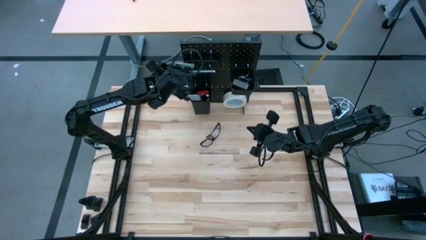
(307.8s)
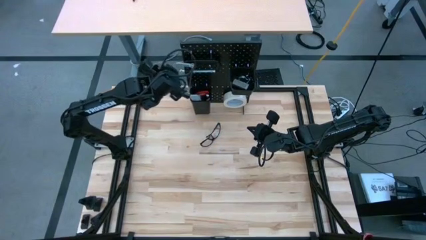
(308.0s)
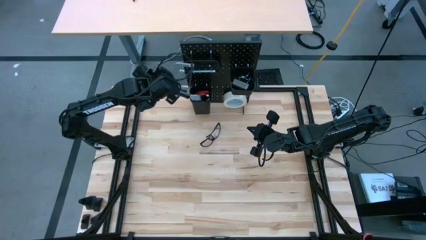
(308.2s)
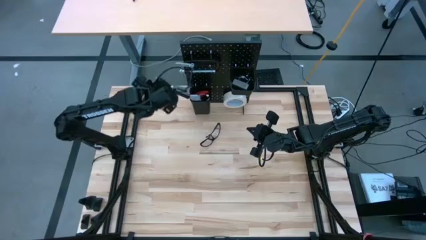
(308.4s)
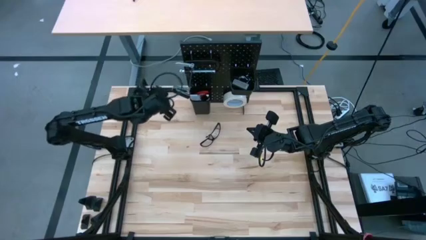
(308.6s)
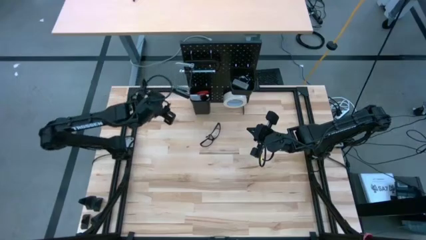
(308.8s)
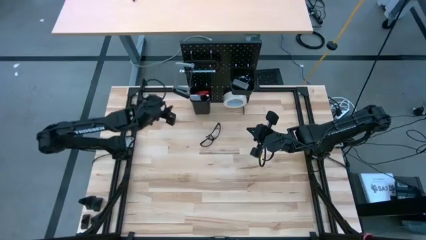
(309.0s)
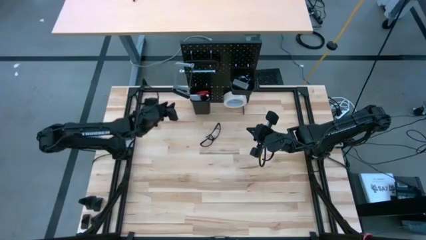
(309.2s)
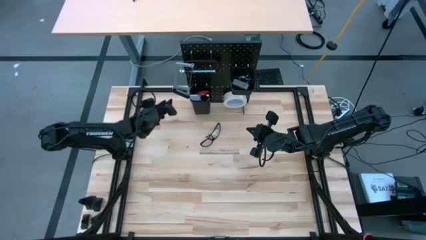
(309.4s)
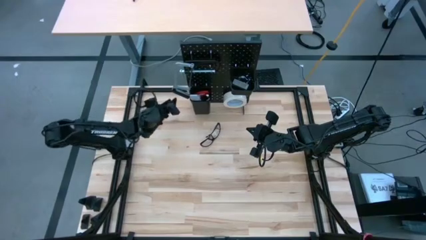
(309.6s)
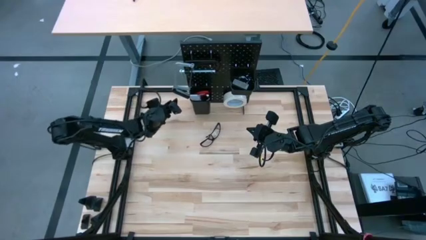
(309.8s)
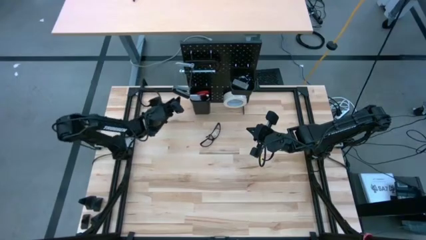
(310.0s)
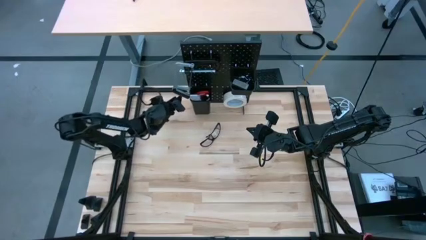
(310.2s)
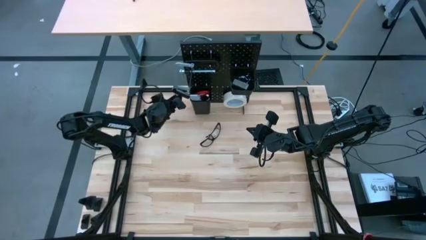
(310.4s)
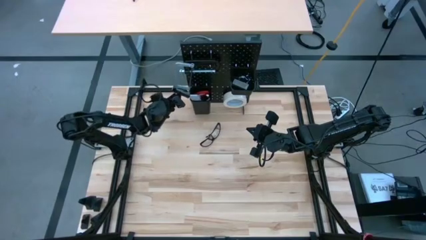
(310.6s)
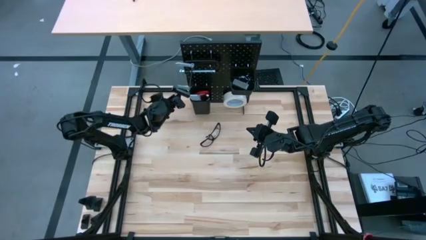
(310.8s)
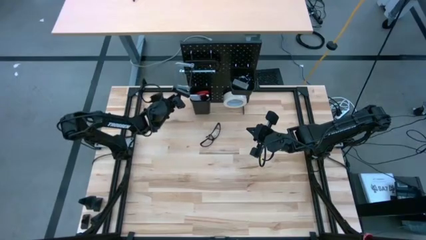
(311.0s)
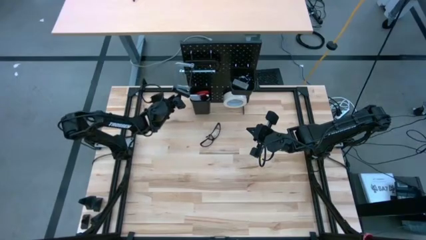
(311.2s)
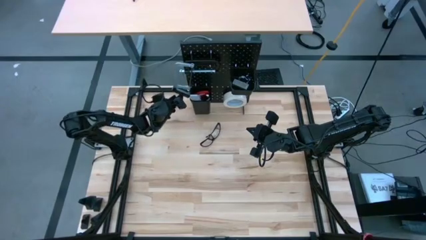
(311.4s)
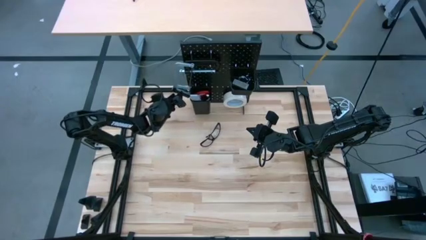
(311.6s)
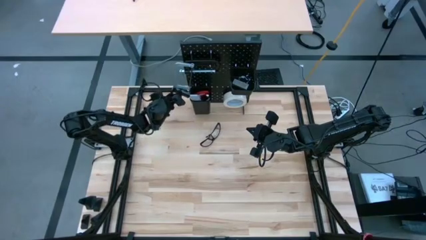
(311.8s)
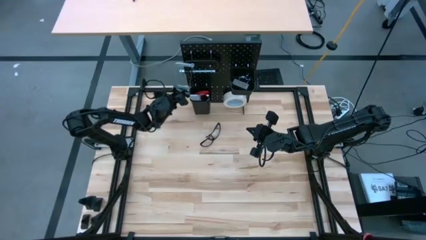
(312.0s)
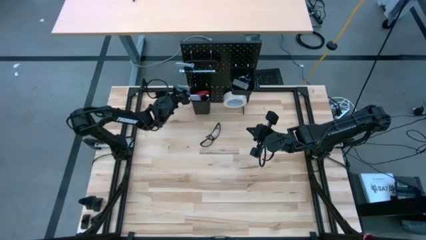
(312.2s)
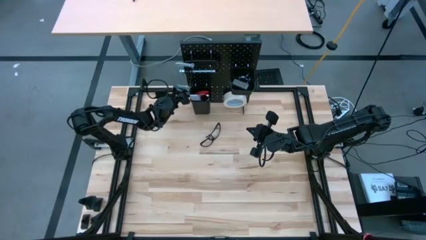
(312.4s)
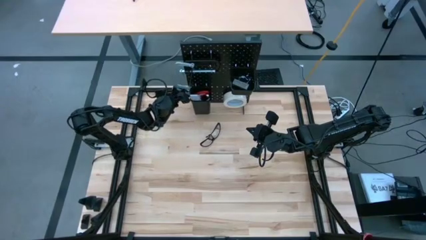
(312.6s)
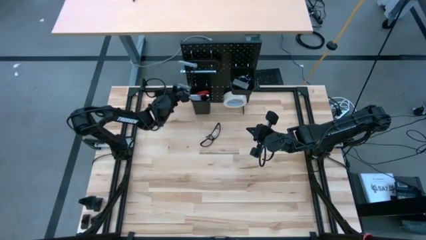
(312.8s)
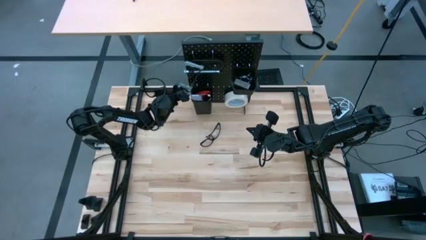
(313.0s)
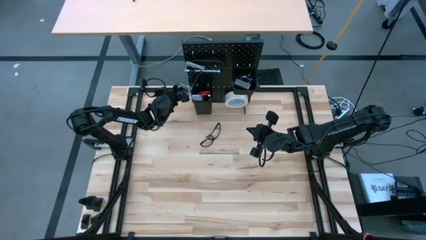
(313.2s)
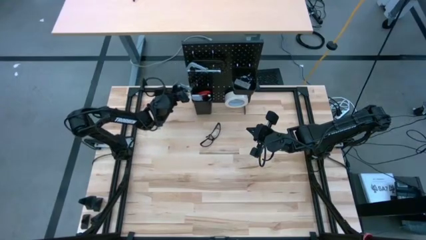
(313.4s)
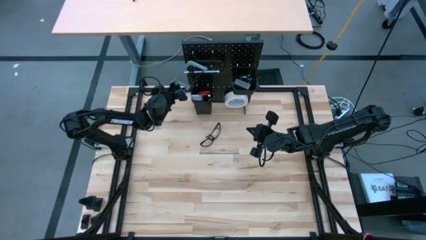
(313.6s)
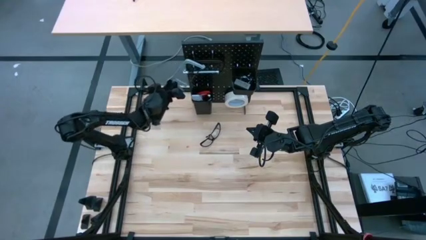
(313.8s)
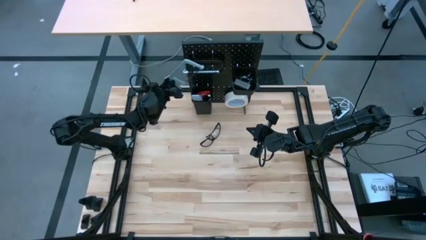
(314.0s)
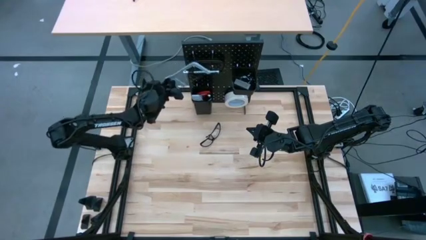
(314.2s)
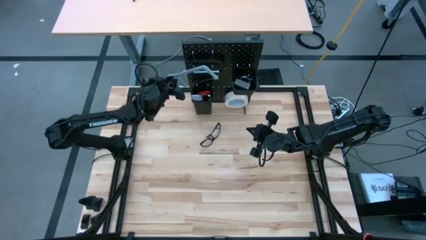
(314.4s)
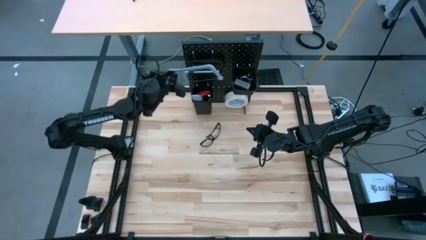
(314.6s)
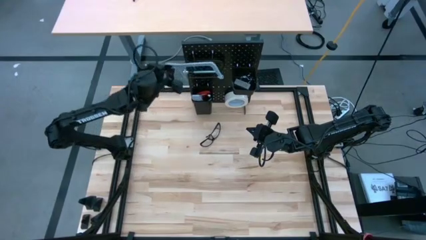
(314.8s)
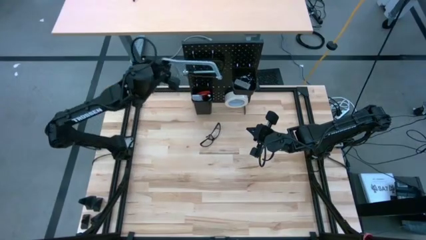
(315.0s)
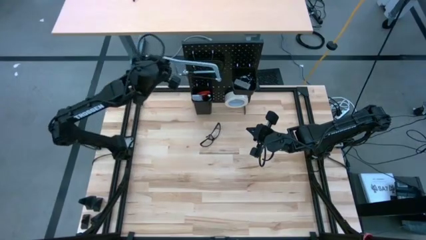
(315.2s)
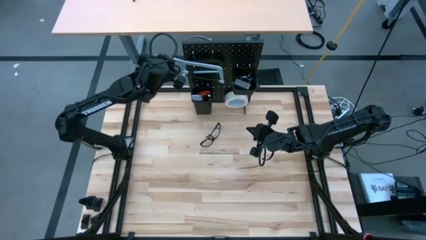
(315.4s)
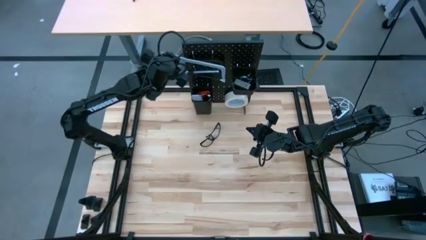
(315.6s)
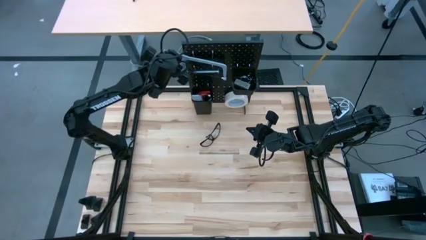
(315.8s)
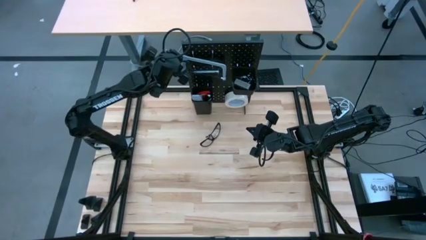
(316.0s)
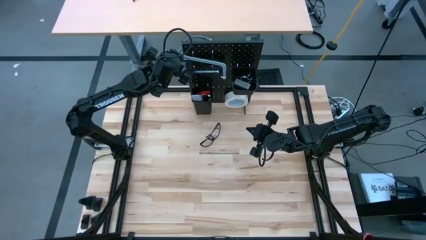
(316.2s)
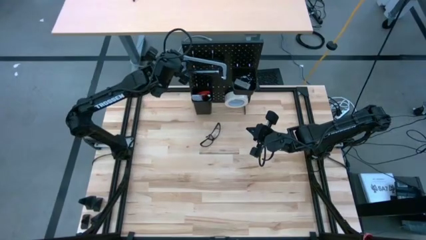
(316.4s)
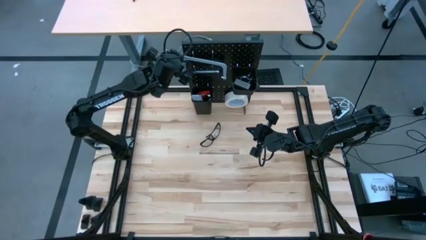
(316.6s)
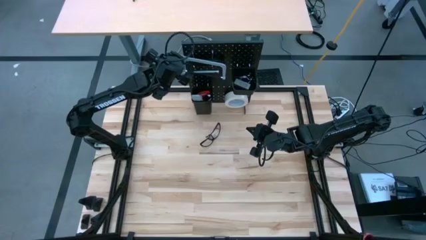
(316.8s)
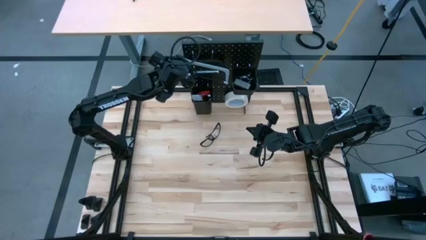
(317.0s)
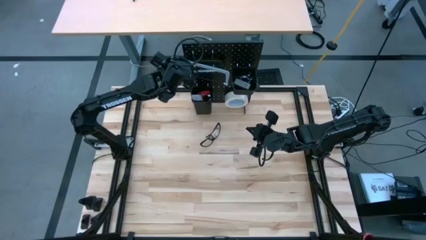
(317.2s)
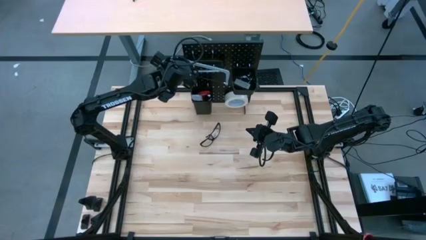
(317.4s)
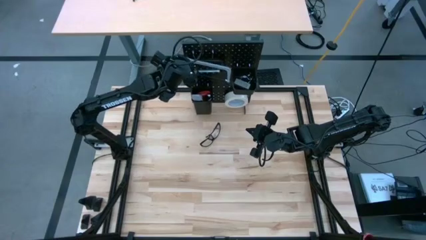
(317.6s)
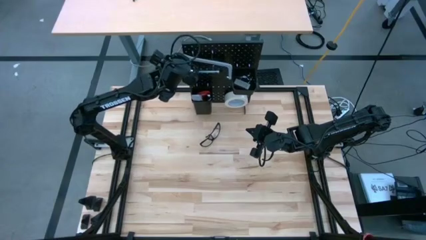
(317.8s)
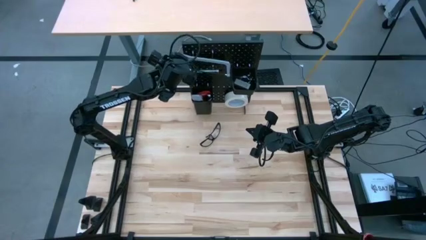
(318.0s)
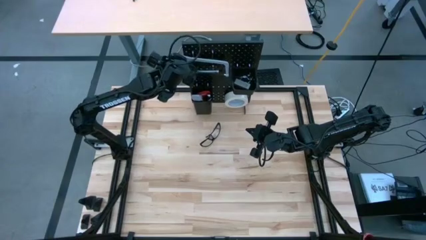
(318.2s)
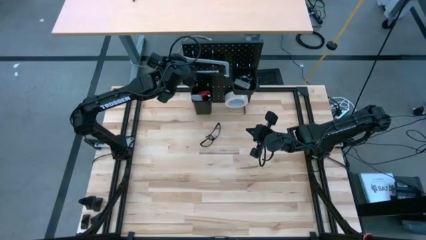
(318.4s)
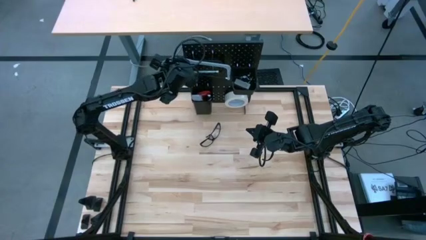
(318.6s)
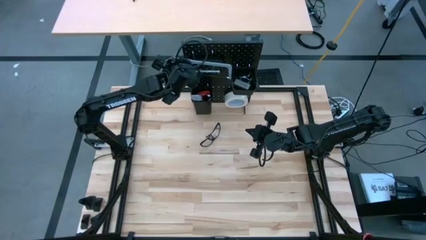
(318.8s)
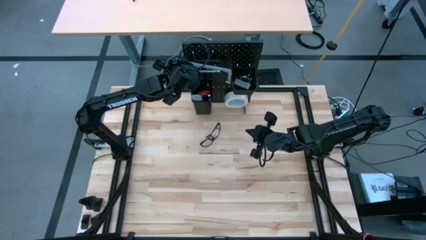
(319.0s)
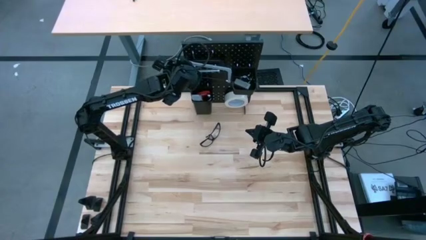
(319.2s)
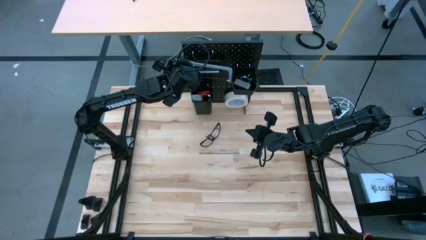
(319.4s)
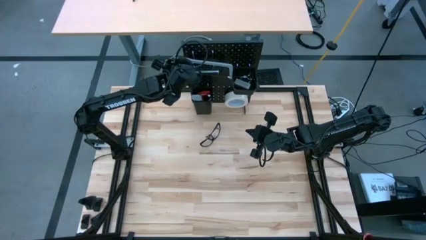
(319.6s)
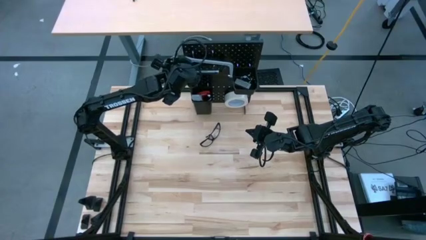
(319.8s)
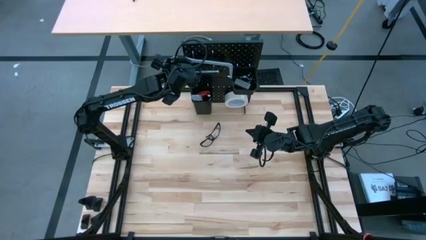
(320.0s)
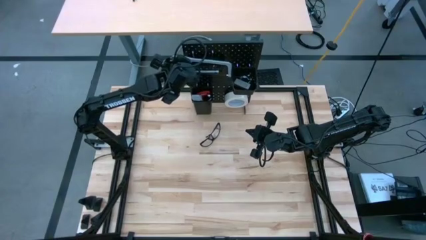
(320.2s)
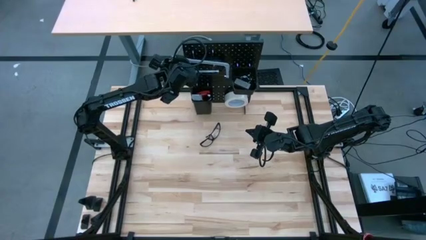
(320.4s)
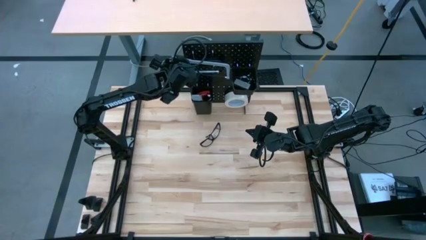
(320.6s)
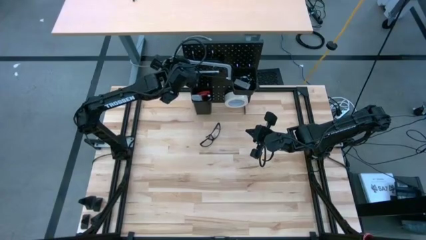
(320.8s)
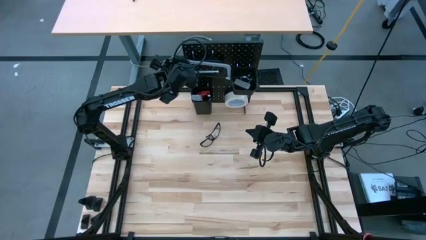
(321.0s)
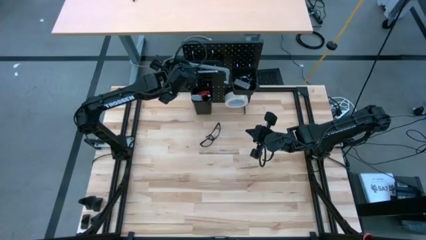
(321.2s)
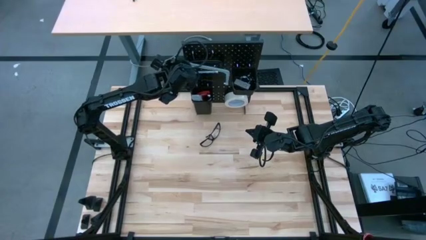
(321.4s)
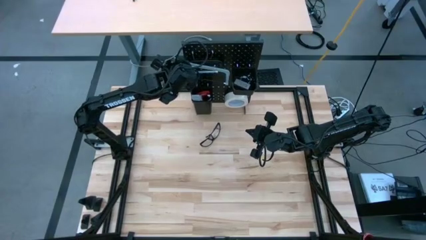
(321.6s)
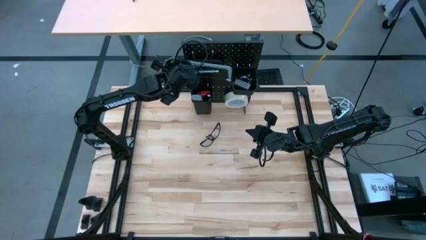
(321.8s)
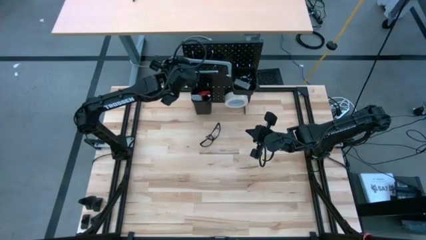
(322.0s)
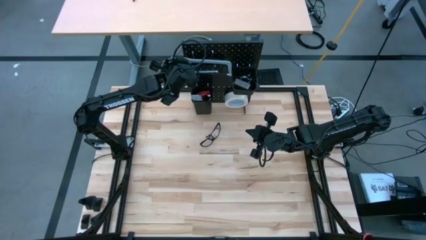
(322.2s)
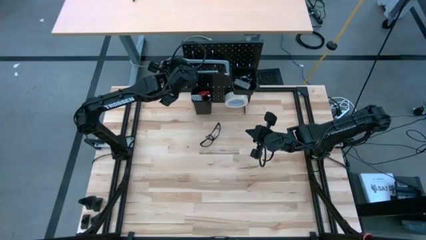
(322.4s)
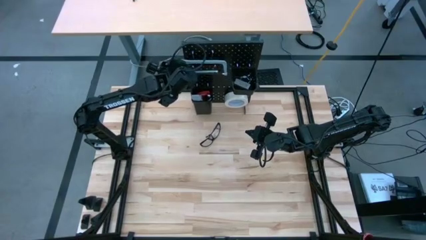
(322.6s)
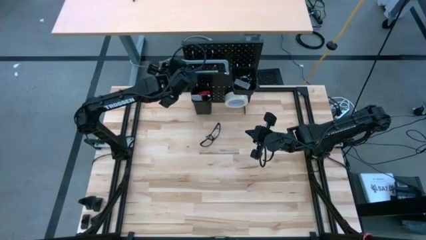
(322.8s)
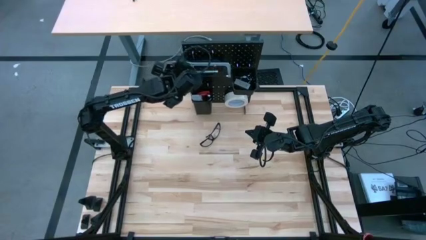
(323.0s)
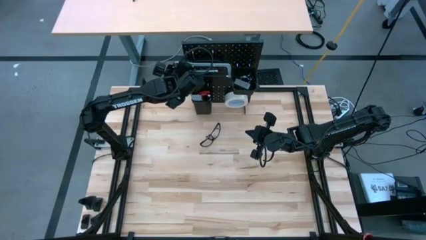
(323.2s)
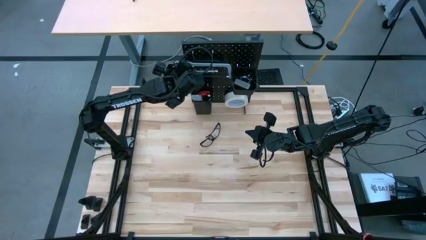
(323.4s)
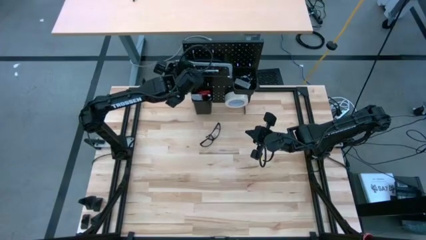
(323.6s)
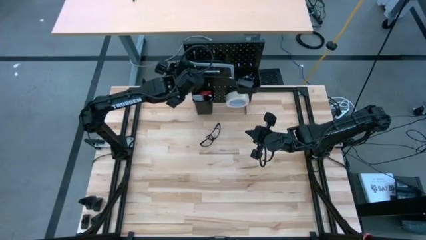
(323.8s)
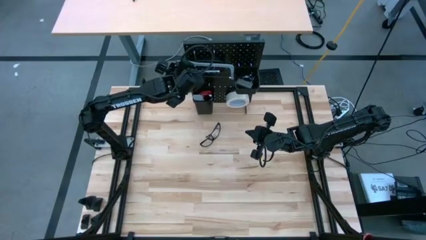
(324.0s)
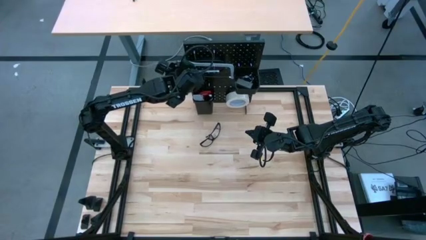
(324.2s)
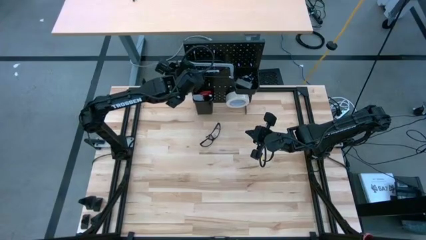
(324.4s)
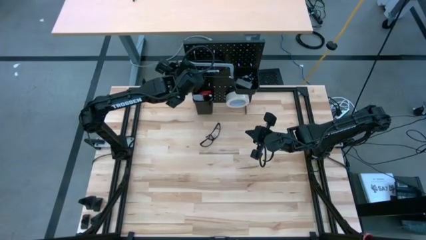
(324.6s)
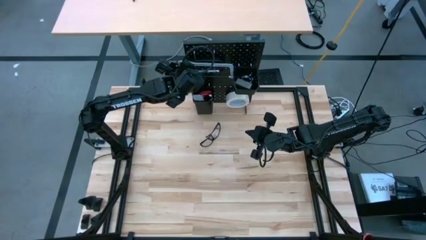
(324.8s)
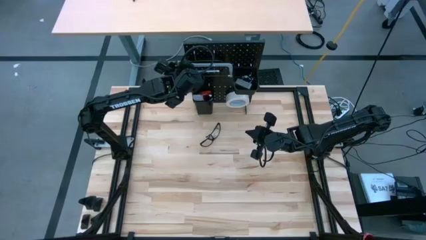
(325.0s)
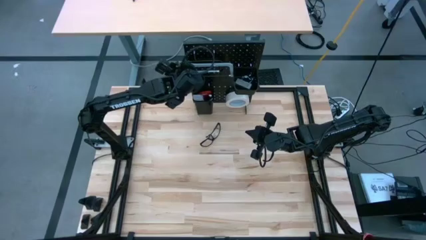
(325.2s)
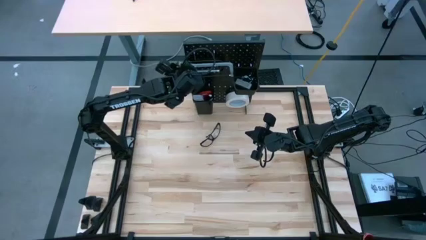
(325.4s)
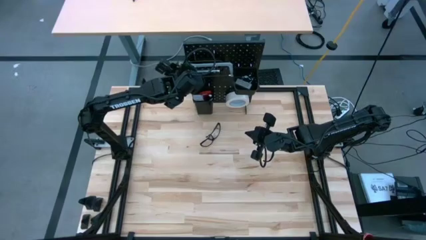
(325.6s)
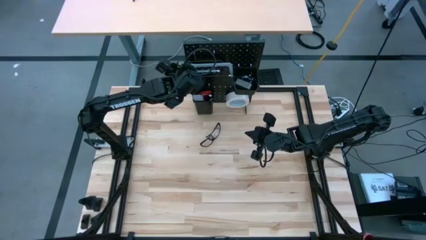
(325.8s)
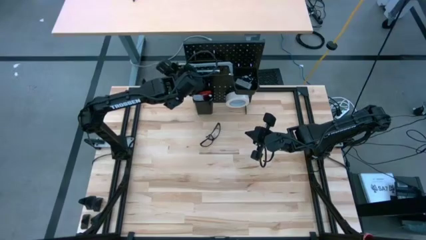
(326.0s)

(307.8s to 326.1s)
Task: Hang tools onto peg board
Hang the gray hacksaw on the black peg board
